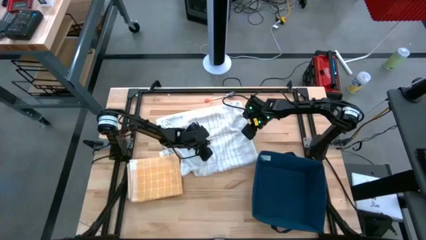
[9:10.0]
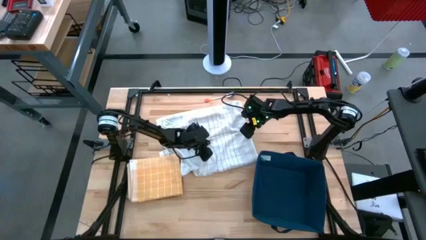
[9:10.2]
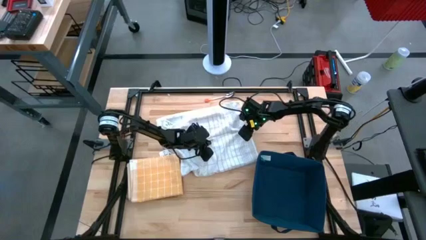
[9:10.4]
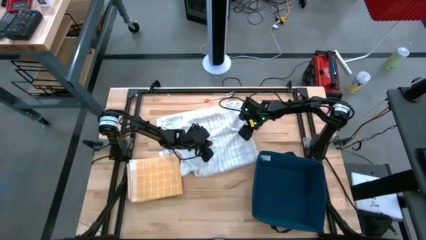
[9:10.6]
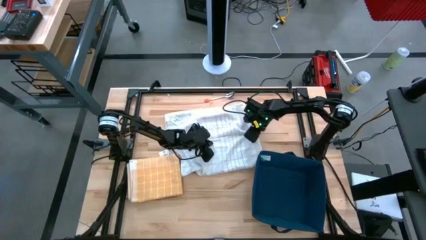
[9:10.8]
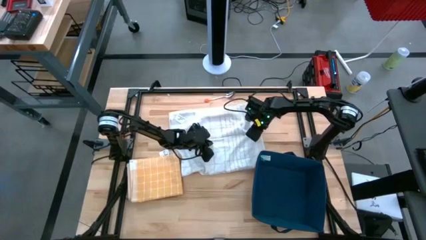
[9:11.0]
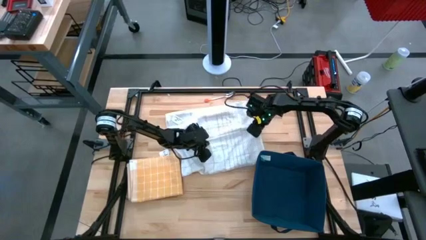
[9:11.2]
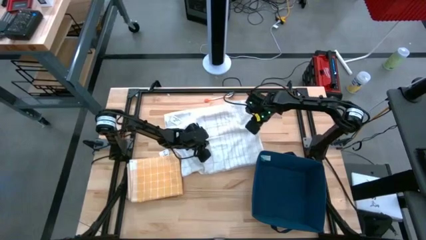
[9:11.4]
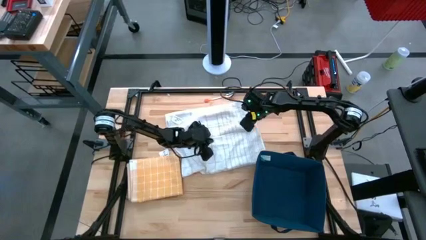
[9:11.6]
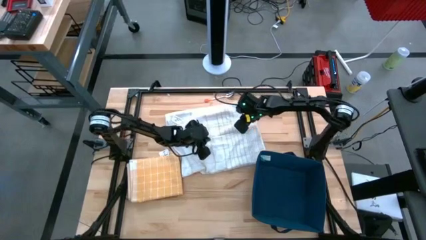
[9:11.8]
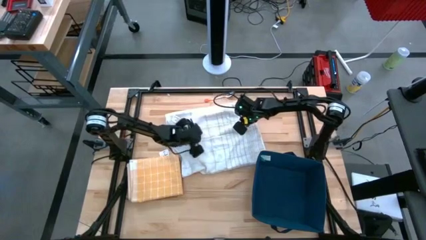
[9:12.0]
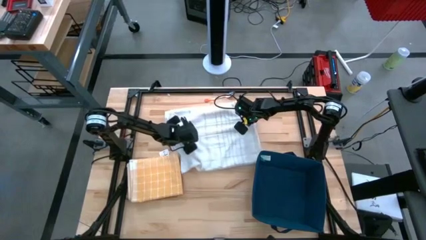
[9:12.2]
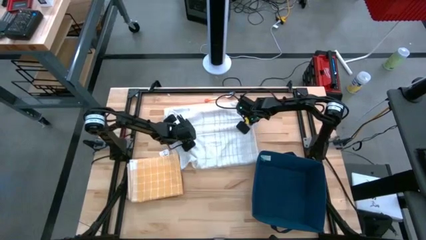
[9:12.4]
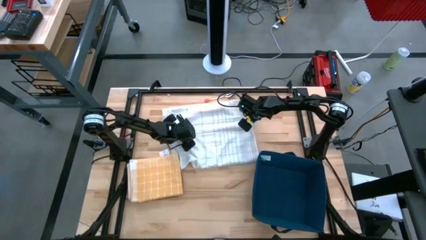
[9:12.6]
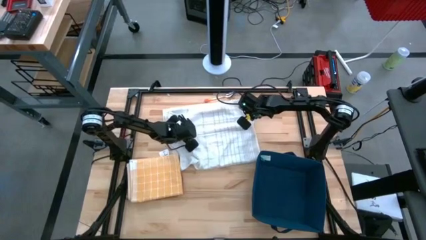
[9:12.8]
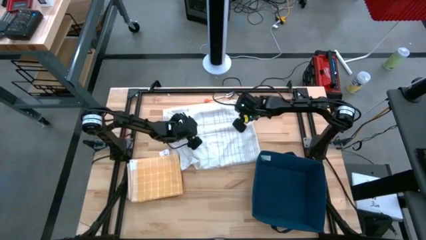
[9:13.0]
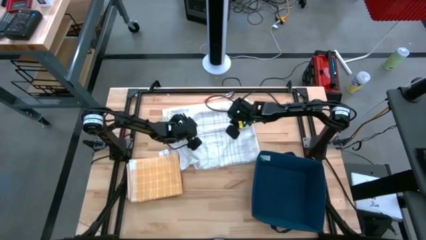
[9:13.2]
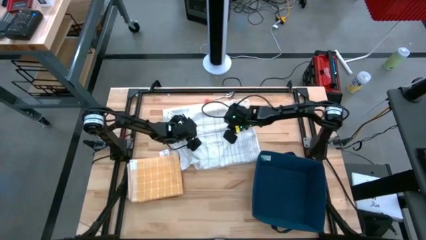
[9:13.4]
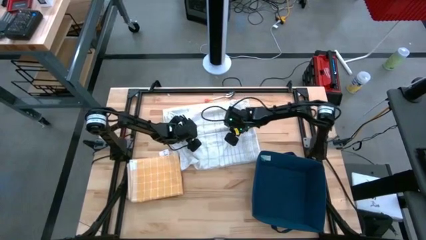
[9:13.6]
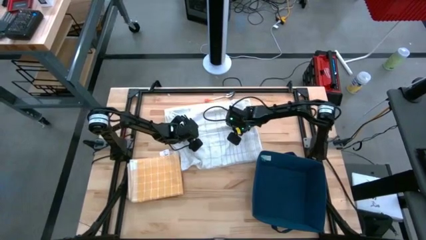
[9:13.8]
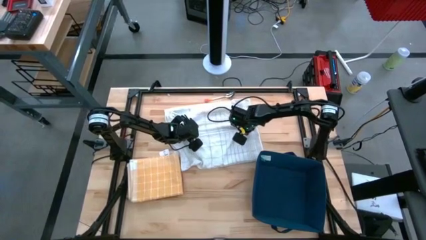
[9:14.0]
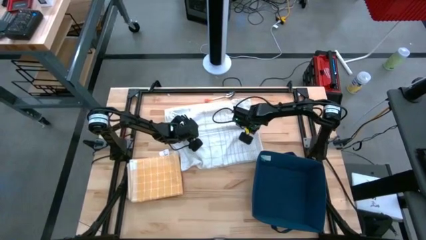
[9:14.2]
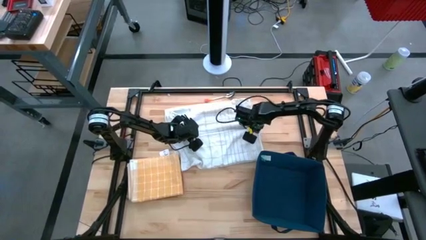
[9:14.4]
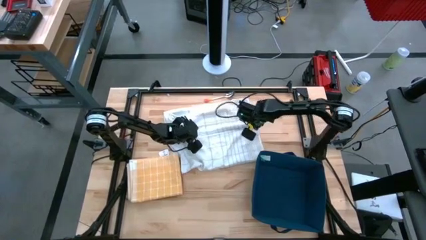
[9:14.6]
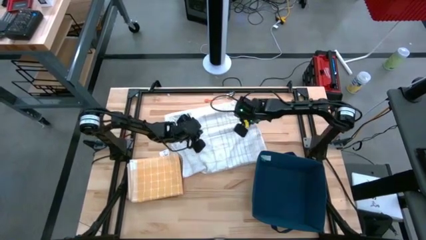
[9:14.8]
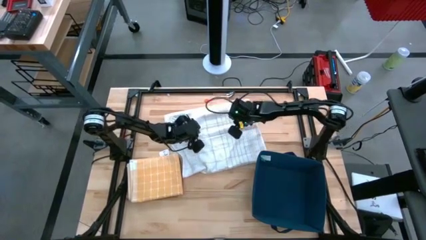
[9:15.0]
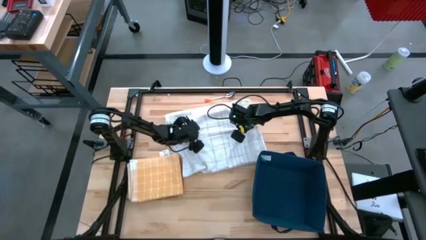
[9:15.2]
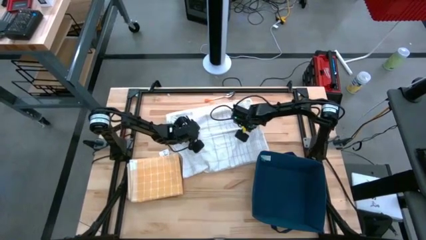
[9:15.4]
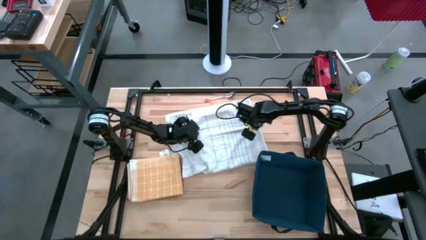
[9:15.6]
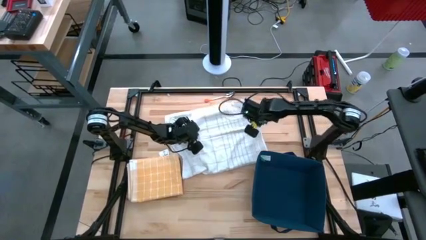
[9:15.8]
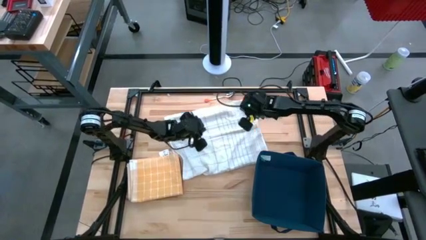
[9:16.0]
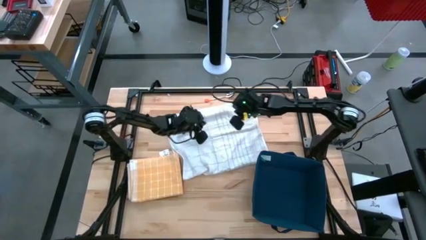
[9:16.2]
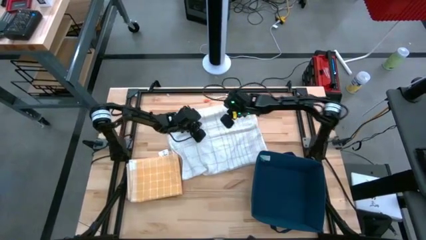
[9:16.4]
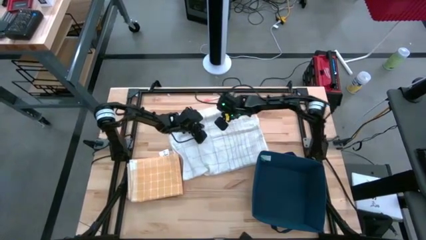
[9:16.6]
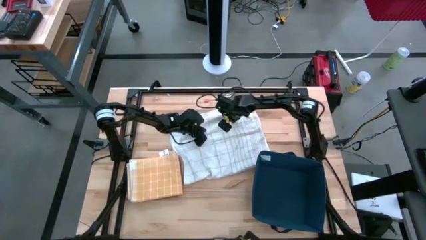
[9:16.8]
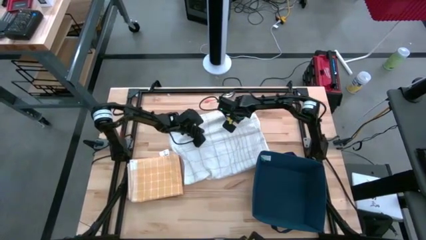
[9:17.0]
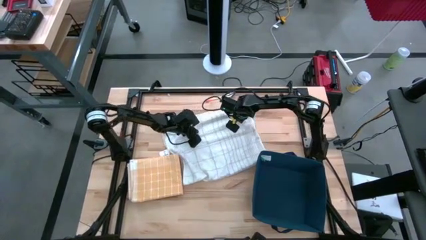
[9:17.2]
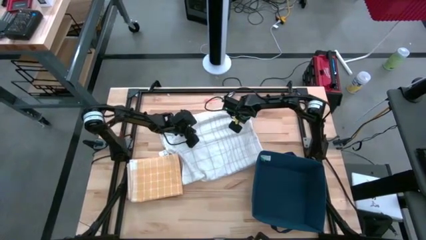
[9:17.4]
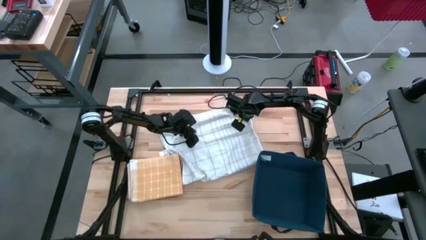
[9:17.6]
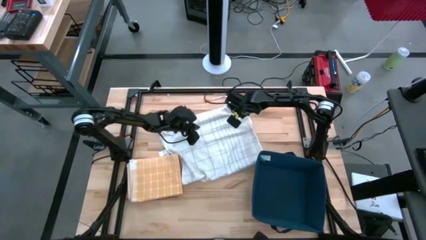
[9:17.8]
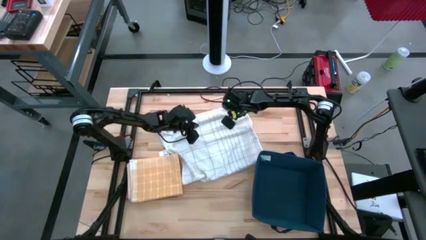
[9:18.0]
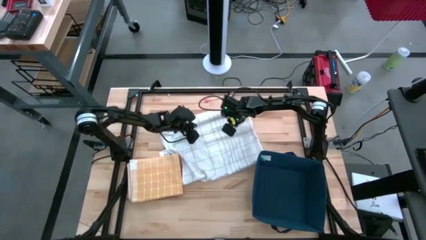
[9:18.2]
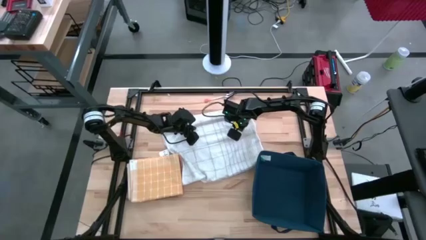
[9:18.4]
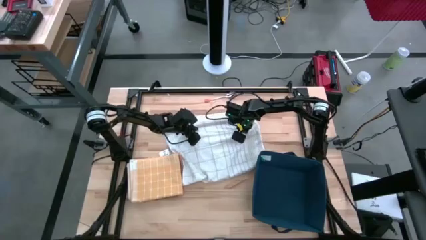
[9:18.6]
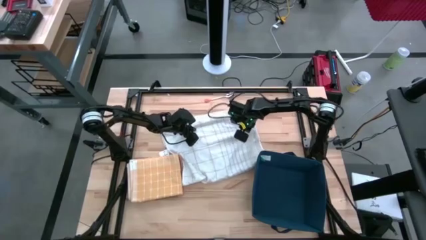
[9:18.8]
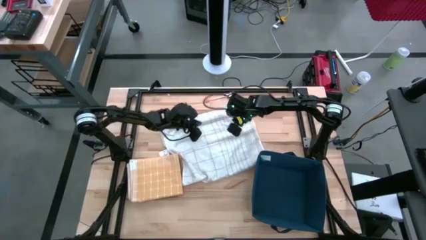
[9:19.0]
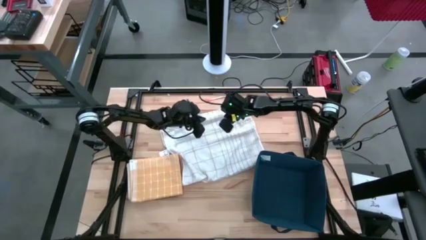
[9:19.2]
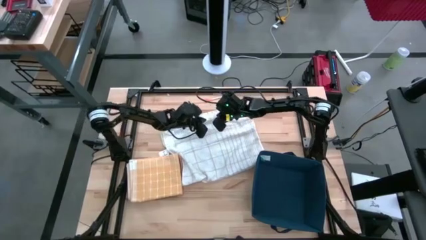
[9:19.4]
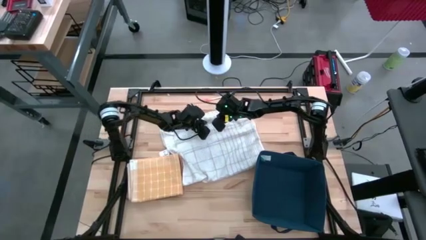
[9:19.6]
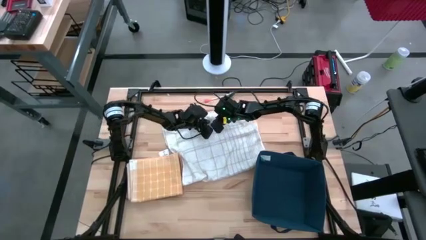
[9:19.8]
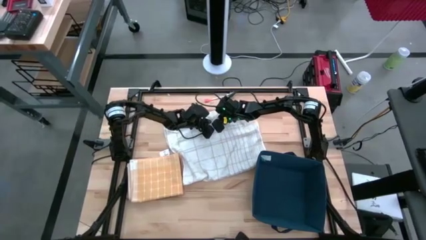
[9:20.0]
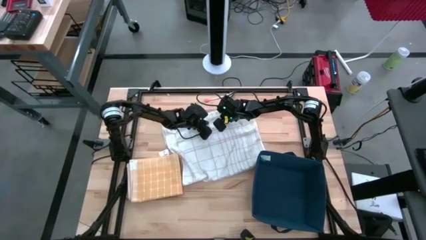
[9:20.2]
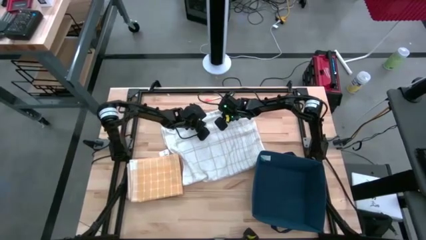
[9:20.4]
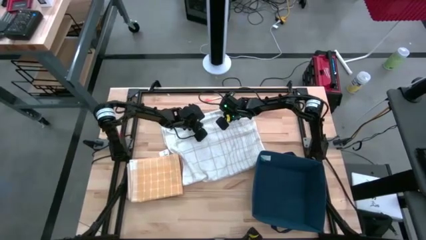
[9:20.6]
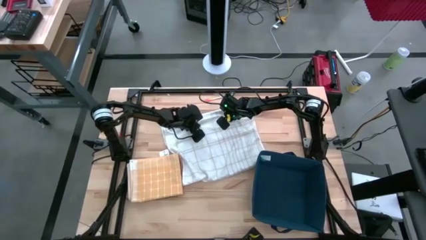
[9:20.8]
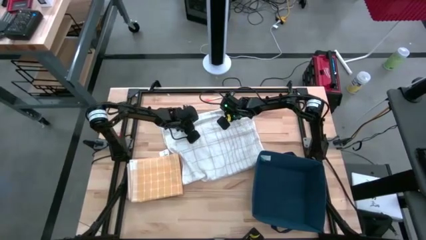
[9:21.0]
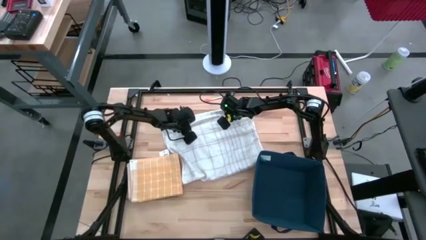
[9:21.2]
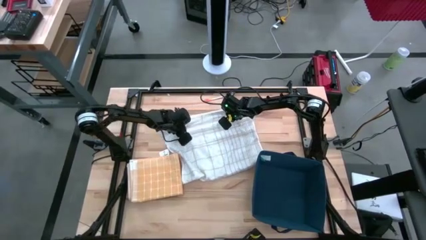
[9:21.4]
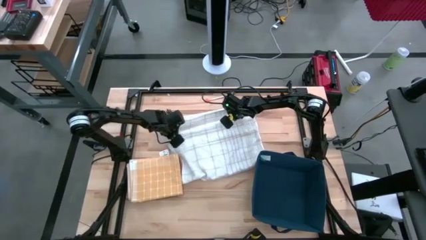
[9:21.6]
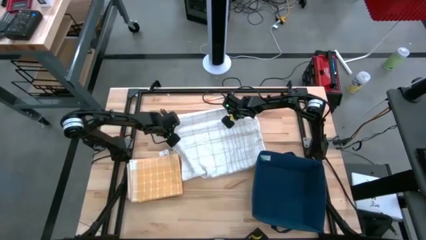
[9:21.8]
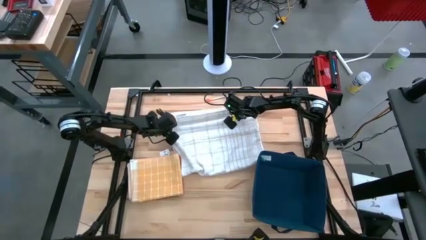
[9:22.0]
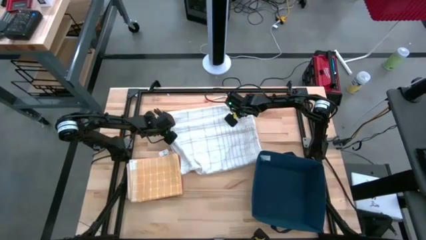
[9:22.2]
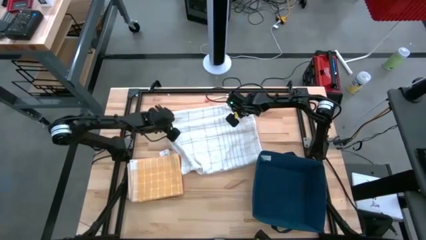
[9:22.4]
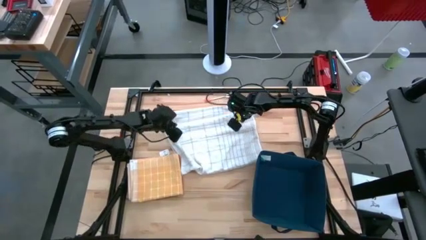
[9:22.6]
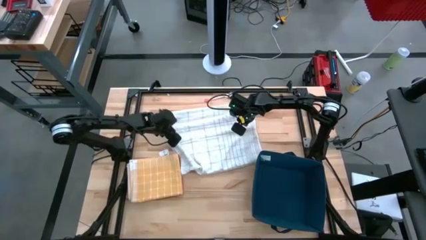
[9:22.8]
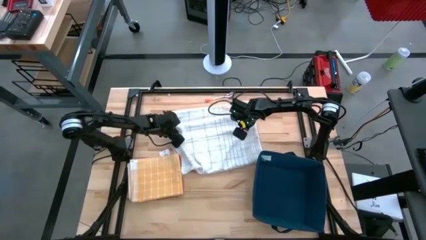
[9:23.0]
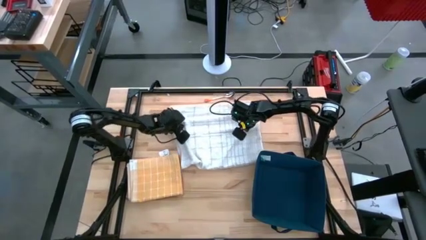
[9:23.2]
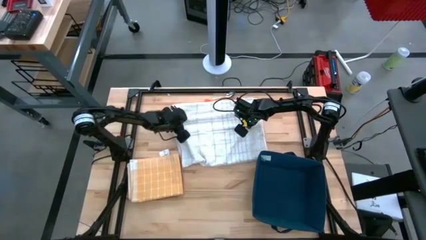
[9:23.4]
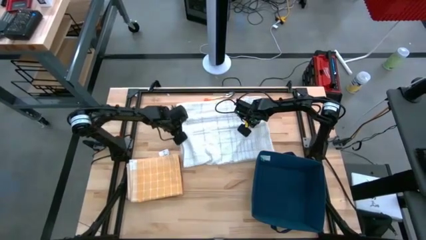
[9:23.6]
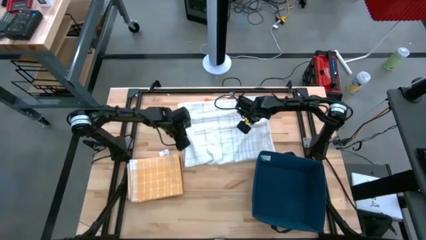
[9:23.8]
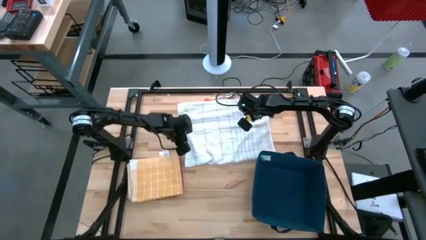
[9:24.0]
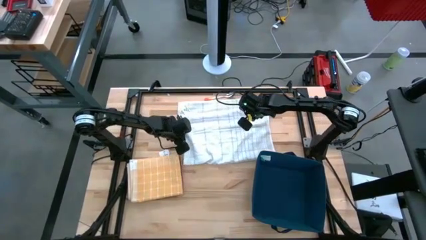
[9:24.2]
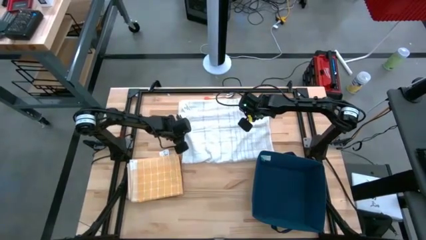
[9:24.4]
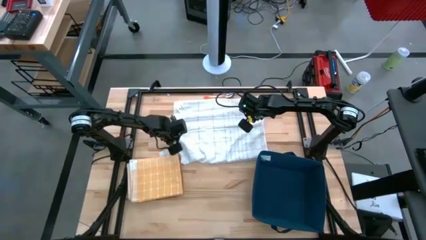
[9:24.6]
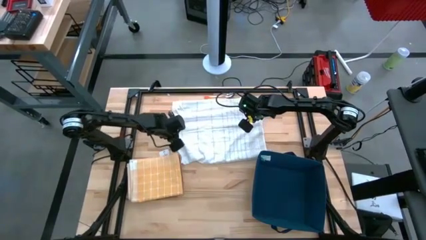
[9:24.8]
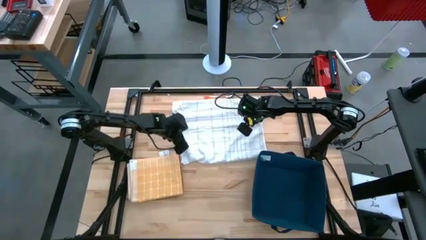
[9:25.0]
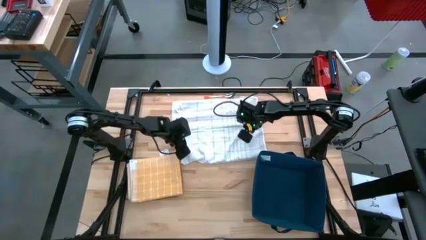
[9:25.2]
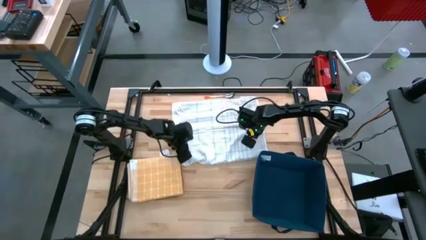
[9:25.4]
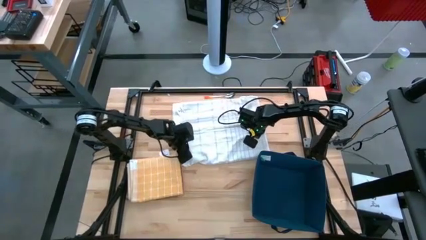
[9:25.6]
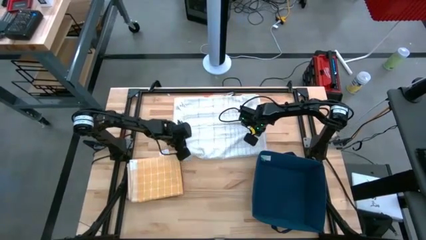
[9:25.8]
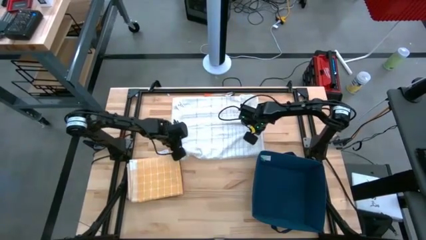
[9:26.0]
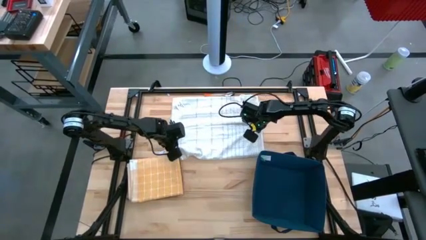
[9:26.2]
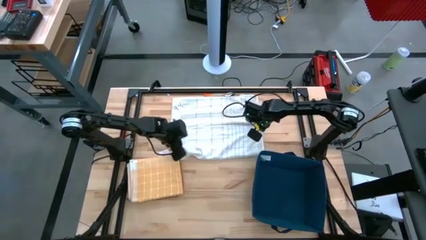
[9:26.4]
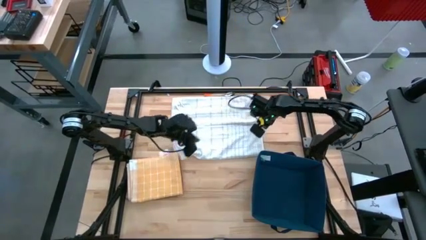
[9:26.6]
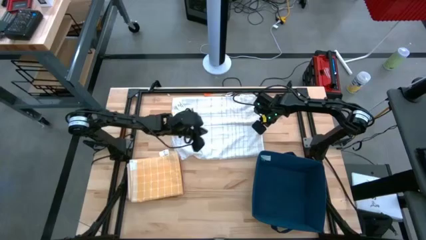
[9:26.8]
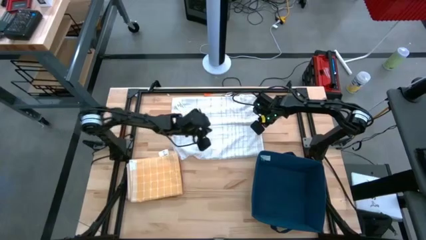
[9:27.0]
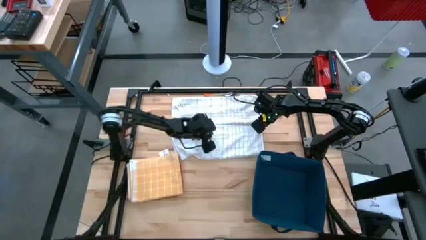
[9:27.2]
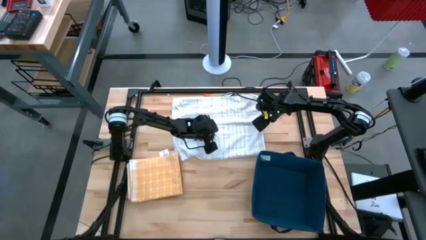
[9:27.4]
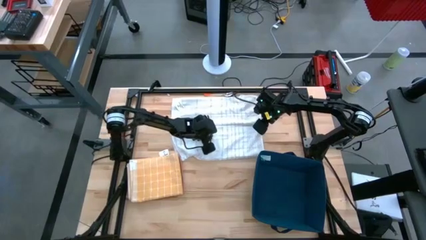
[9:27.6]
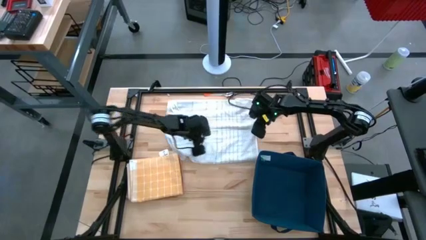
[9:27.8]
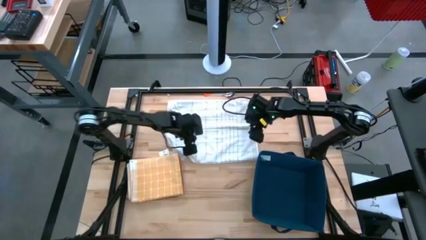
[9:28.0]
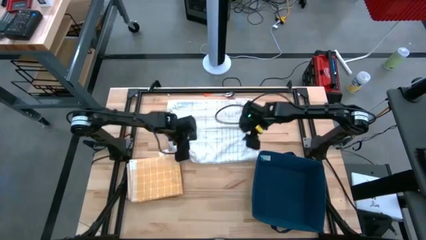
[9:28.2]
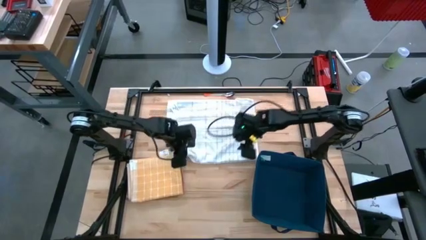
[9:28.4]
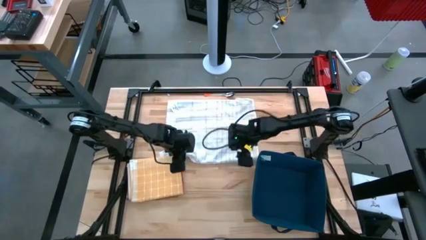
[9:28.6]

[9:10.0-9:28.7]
Task: Fold towel
Fold the white towel
